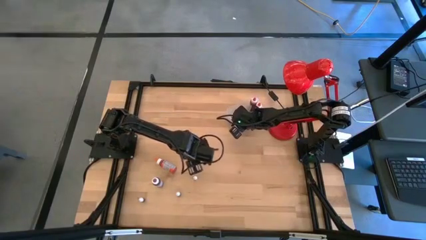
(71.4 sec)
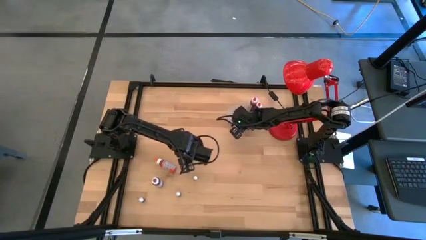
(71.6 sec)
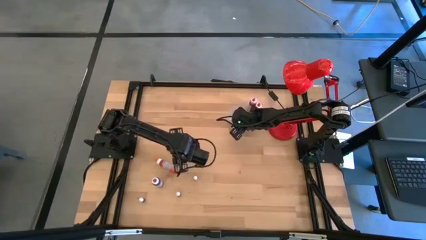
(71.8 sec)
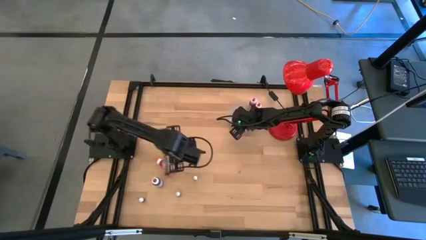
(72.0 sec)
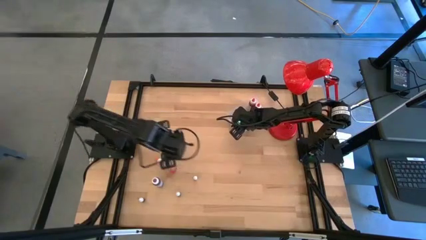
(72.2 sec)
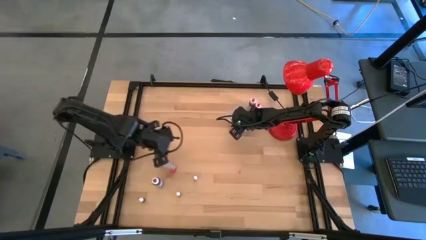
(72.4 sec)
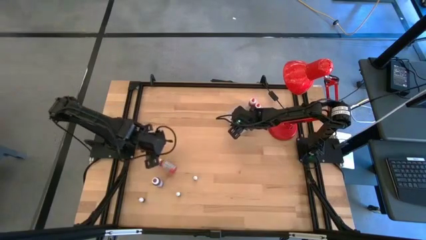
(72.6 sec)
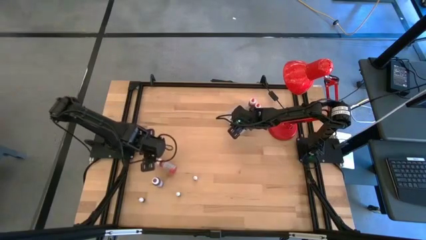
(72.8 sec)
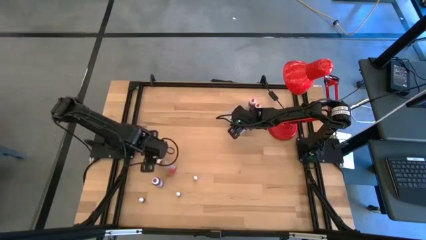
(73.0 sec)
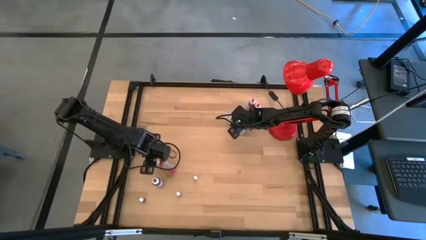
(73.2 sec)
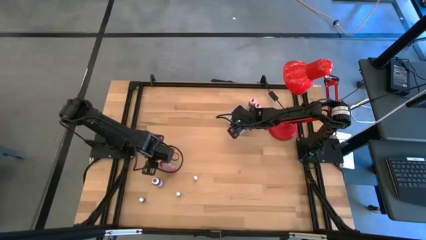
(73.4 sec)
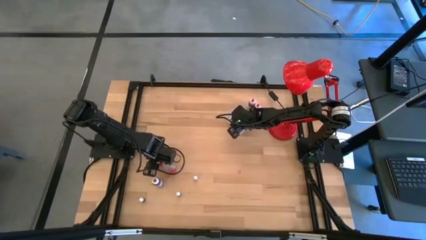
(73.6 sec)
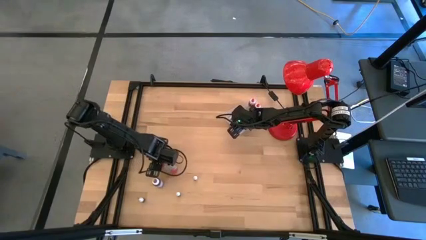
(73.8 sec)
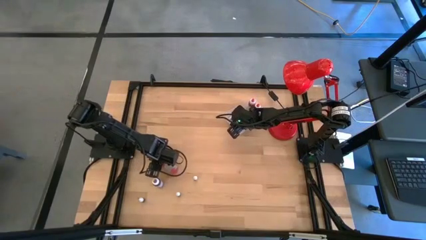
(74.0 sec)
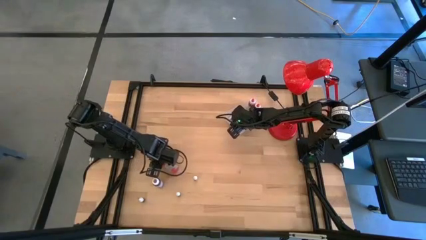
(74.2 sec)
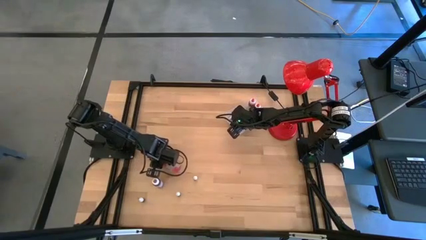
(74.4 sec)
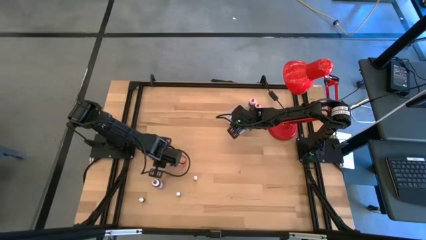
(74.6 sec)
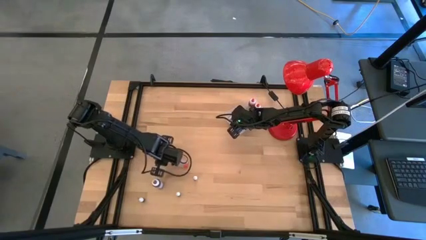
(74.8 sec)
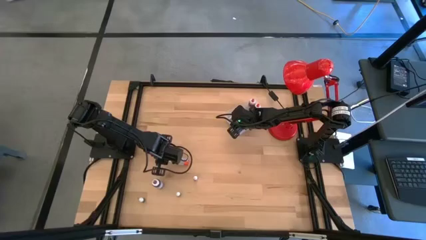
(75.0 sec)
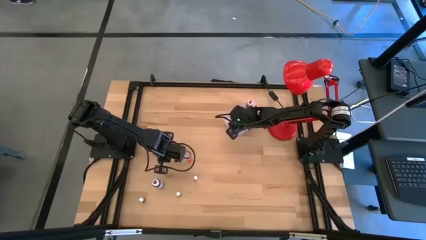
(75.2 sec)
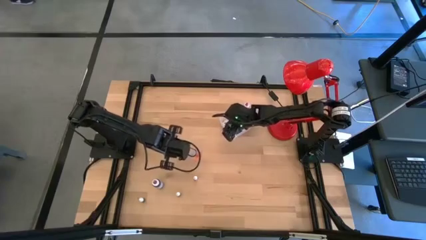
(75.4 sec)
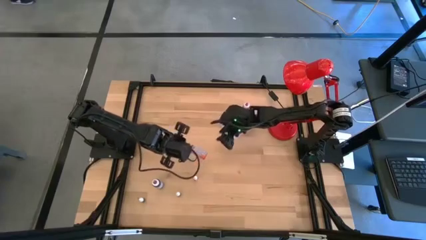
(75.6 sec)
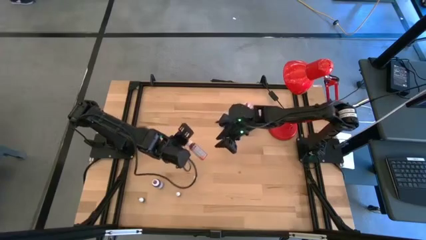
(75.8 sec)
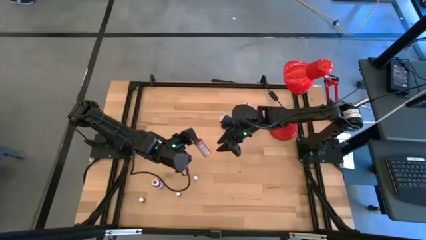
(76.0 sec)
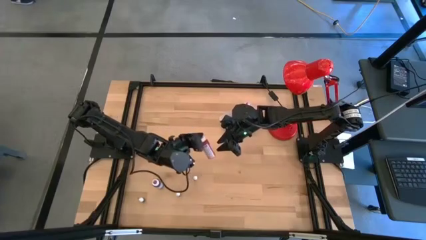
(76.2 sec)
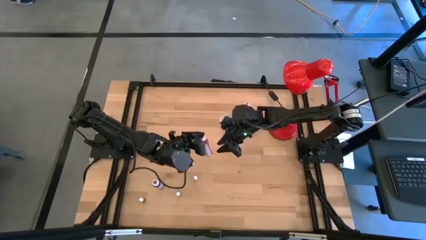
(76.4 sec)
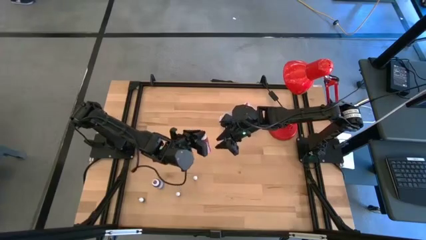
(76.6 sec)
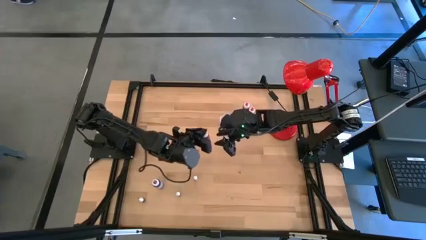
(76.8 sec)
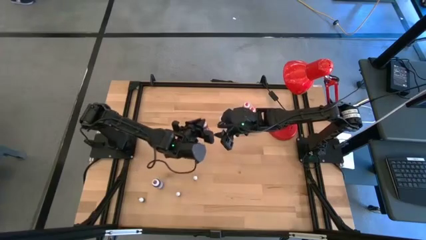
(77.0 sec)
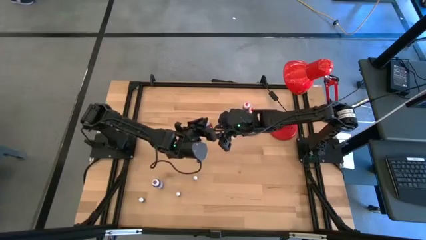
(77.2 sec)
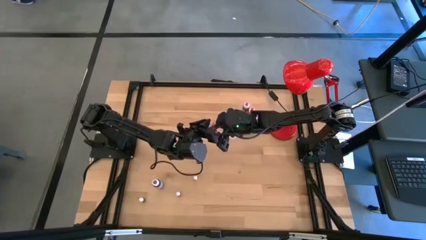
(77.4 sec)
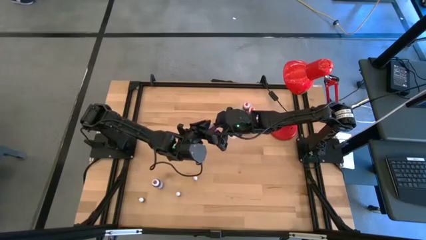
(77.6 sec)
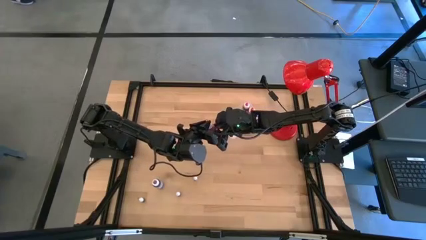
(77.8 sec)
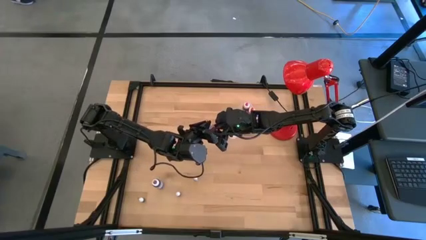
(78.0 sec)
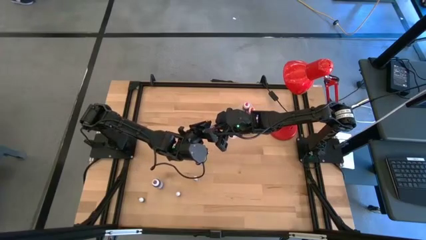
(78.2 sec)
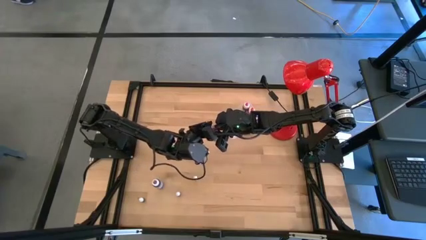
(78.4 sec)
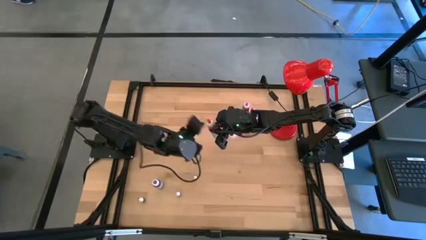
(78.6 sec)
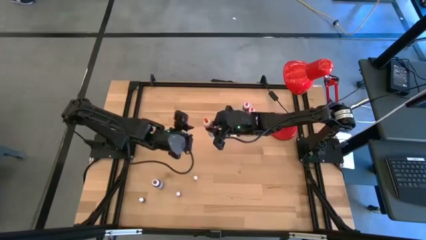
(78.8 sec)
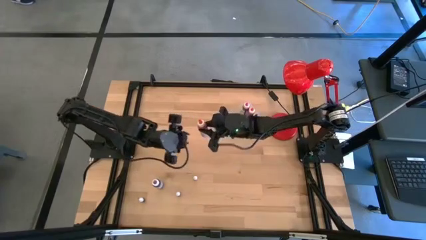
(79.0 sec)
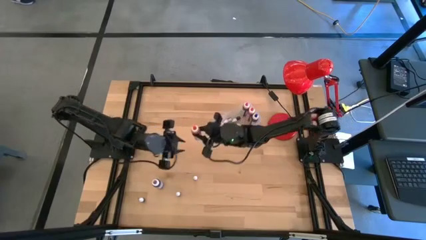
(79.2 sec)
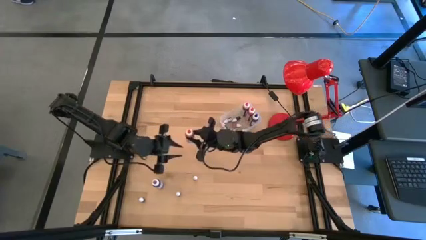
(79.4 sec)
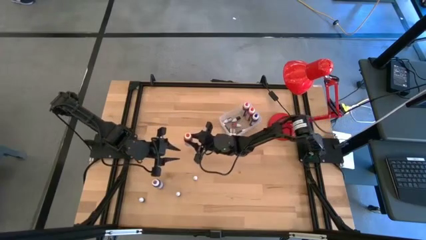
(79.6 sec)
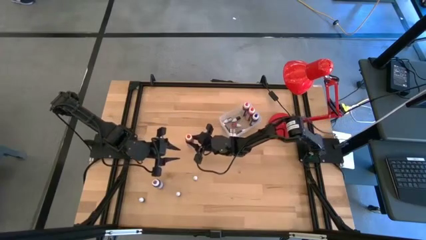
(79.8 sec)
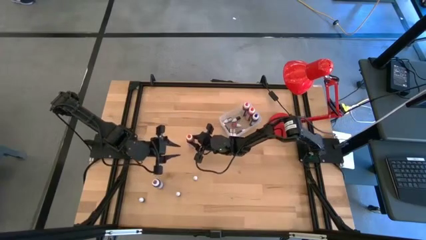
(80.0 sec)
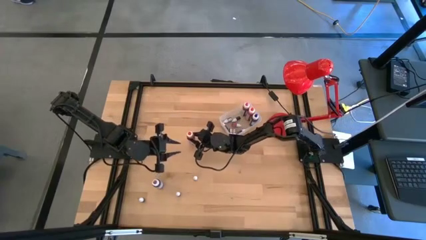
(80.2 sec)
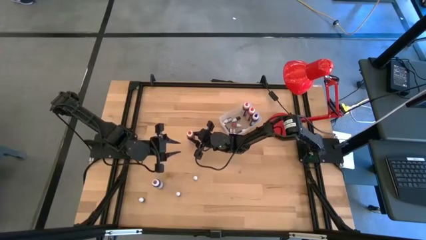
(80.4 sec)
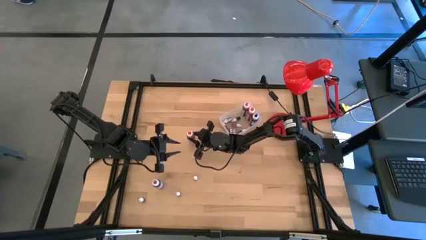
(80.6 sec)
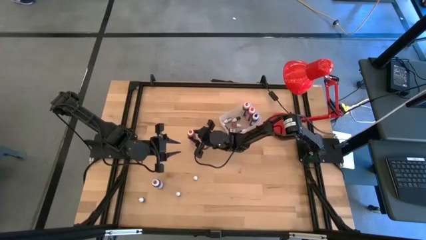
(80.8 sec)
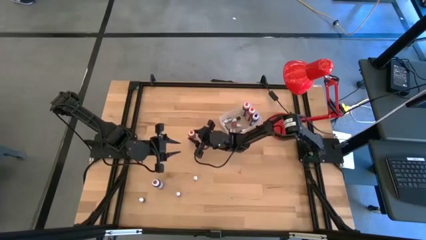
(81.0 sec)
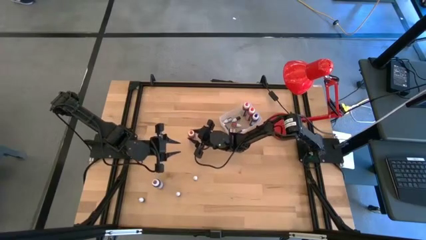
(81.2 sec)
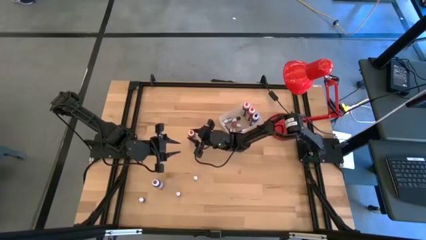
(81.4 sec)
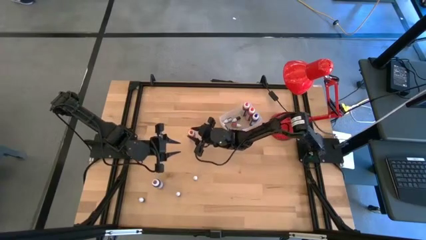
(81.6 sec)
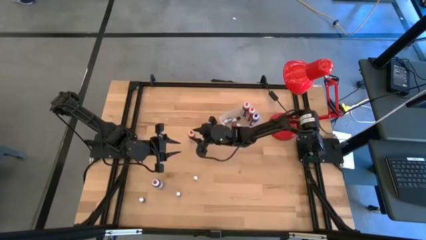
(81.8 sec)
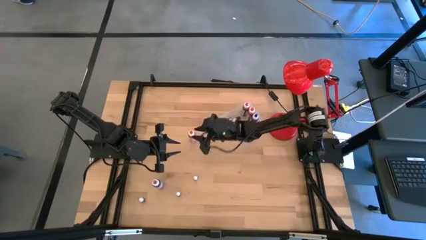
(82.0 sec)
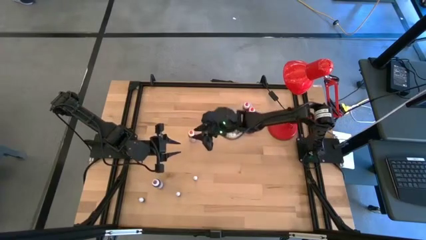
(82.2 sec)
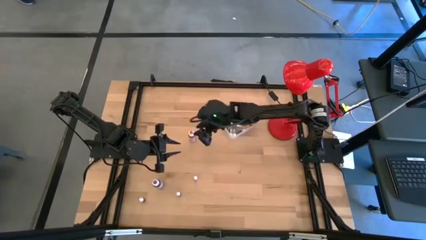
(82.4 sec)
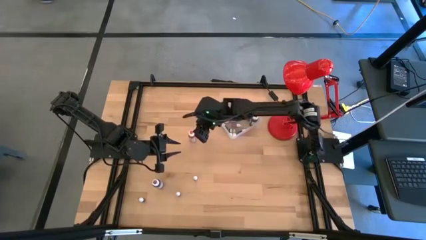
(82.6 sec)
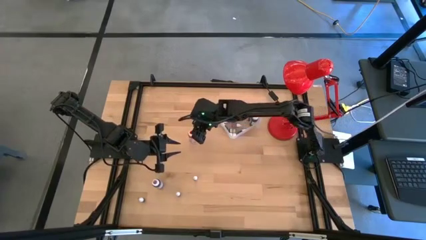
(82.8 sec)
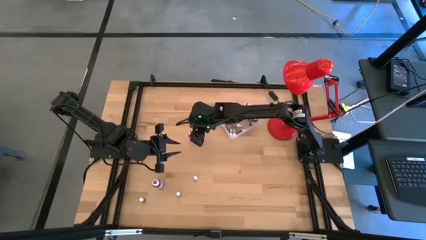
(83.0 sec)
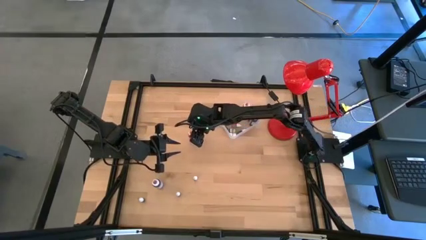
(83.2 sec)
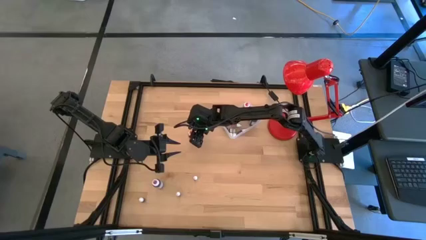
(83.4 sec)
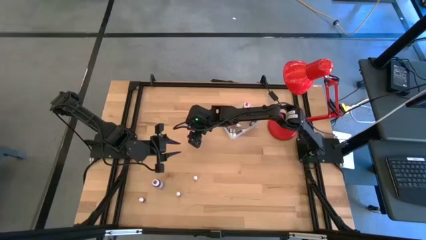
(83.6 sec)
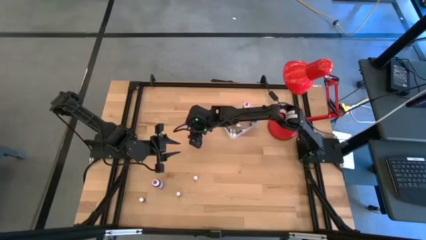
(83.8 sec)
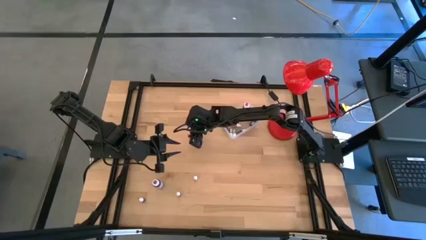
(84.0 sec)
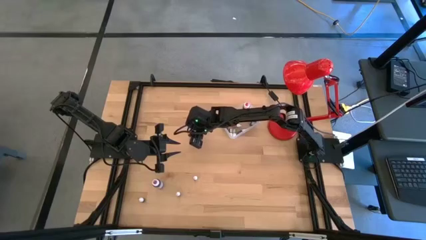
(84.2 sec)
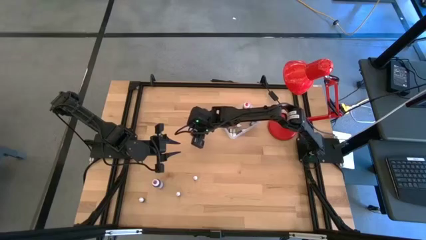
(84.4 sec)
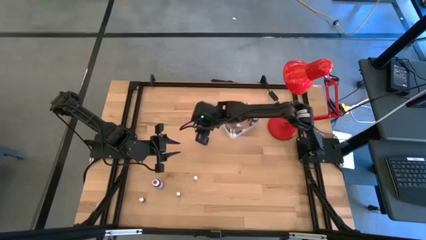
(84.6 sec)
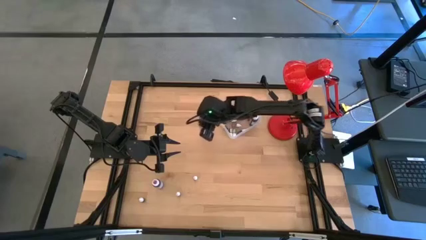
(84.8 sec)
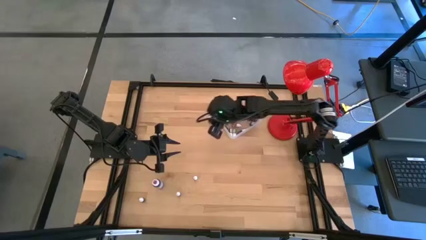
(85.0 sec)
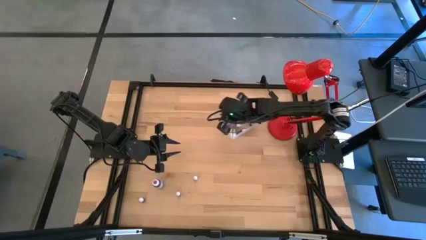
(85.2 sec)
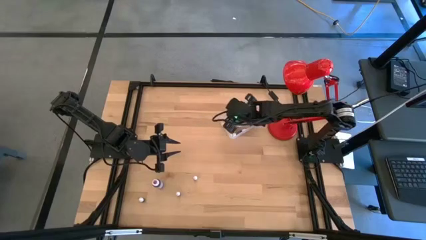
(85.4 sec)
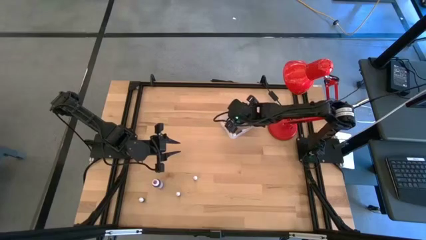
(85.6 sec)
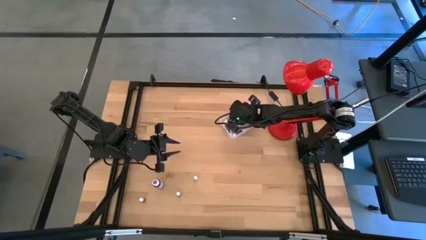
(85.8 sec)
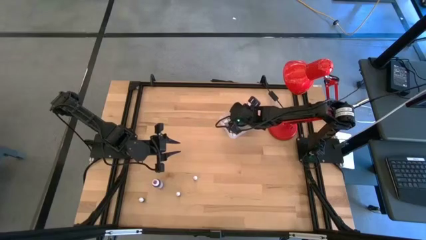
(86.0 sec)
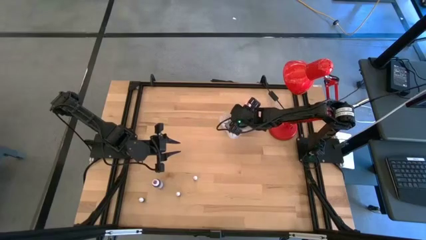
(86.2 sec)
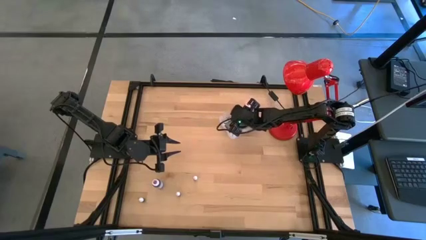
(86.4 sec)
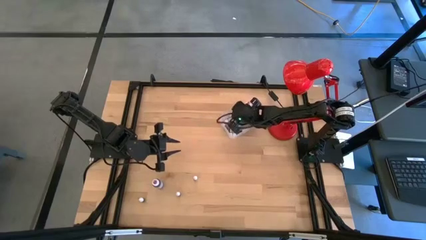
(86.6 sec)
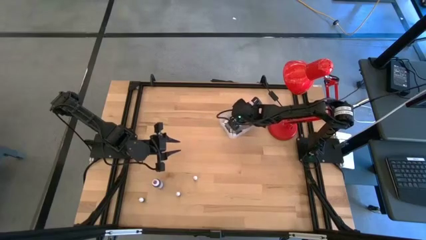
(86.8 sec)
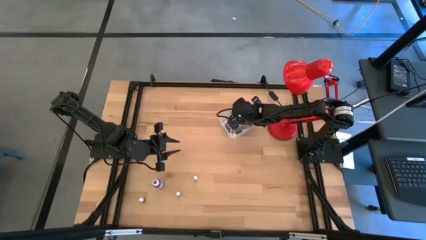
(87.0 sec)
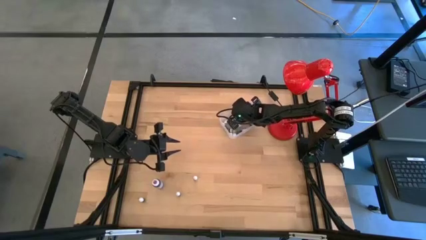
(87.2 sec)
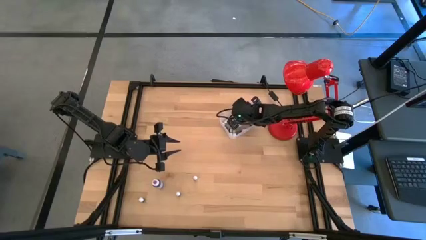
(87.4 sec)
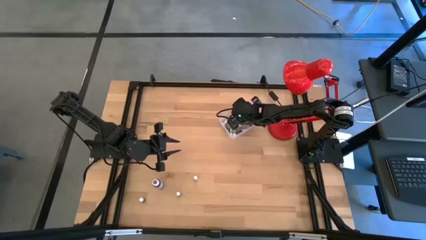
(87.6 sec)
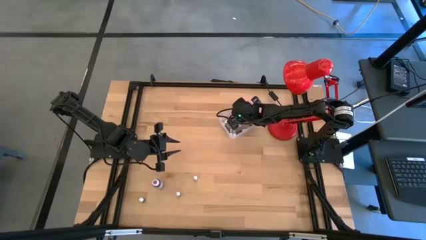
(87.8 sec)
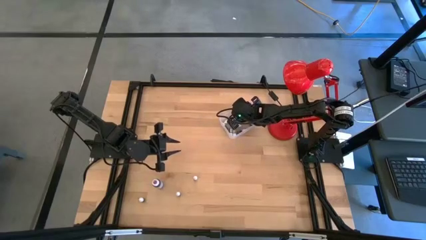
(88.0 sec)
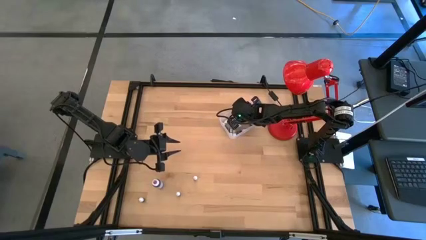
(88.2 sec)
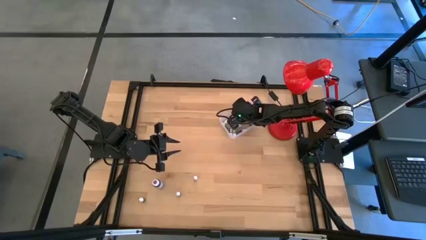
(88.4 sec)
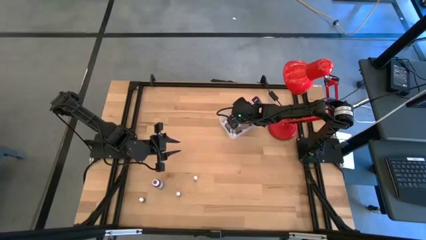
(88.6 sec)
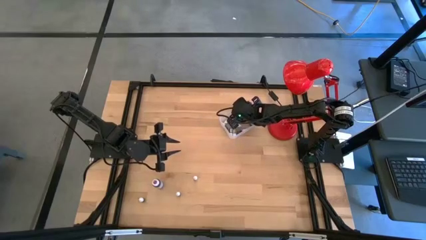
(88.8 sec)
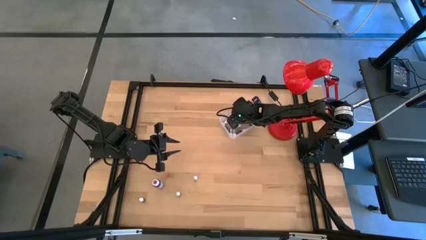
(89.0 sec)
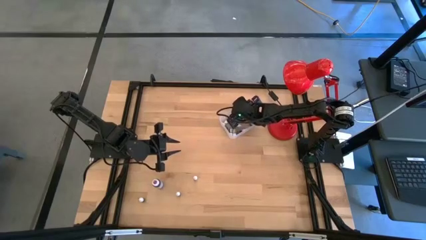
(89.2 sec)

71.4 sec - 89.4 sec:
Task: Pick & Place food coloring
Put the big orange food coloring bottle in the transparent bin
